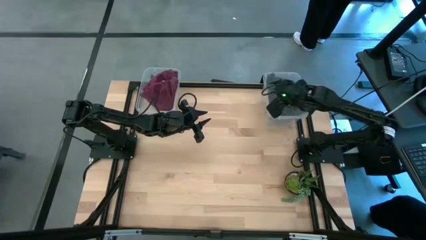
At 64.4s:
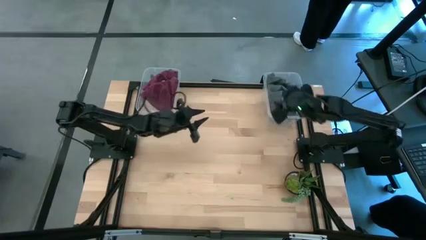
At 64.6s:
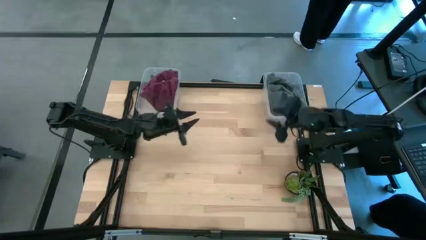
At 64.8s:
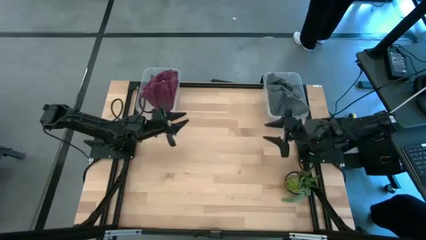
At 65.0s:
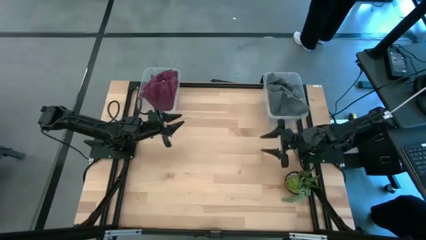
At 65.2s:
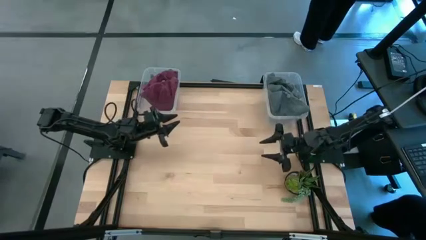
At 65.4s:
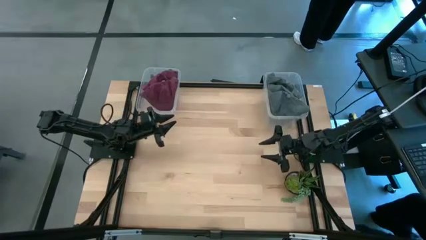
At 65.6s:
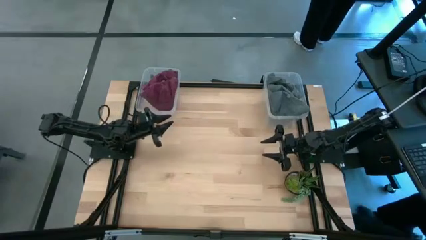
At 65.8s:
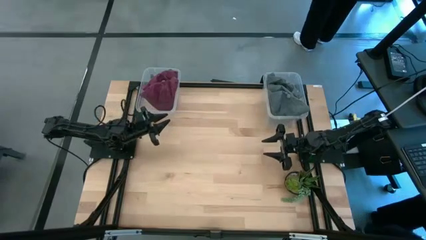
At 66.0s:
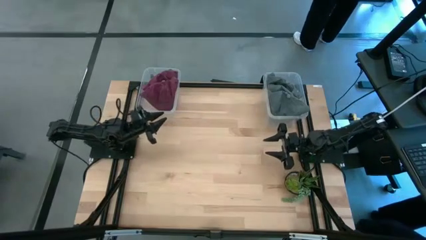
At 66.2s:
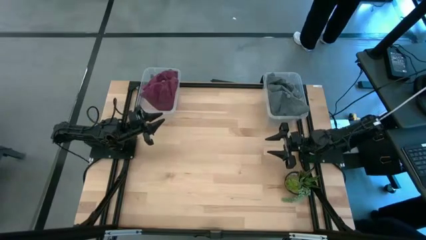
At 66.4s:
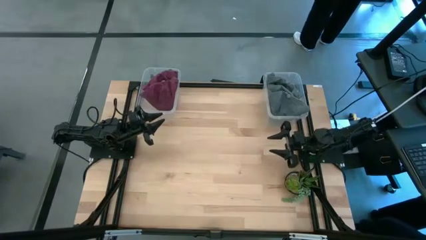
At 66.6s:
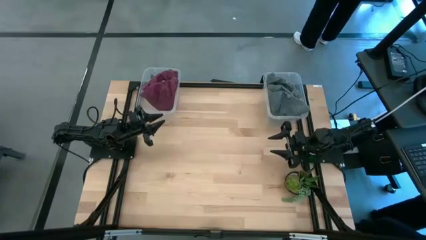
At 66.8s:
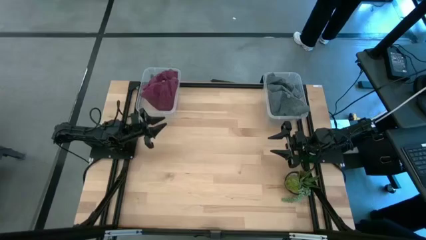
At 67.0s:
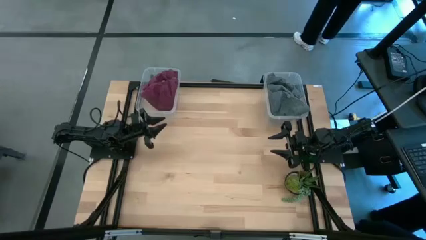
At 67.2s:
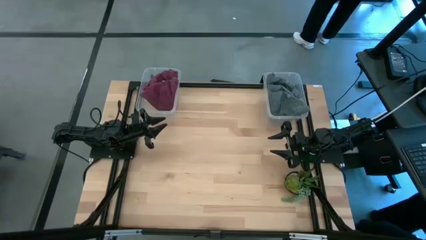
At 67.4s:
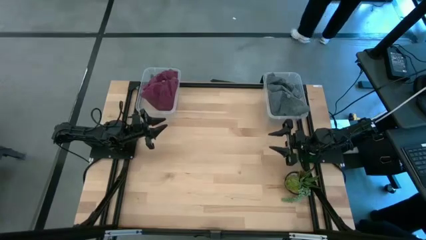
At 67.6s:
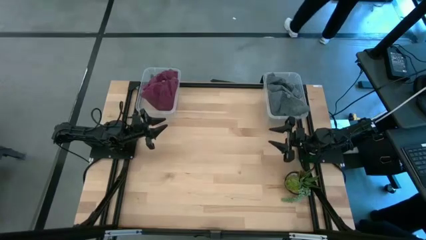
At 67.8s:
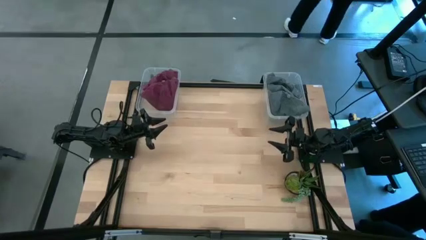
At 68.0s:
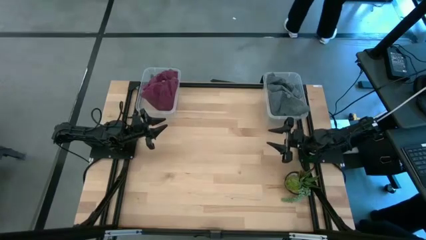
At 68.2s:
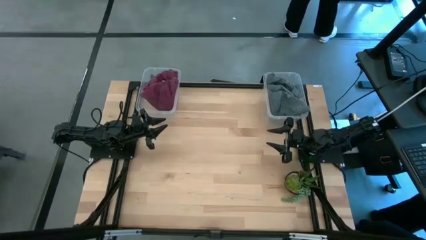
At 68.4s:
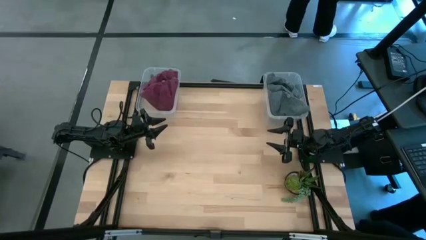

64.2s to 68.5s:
Task: Pick & Place hat
Return to Home Position

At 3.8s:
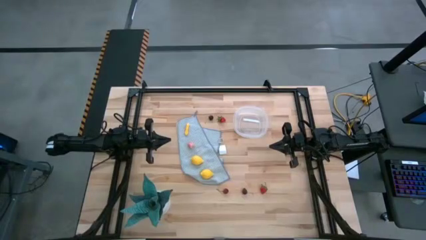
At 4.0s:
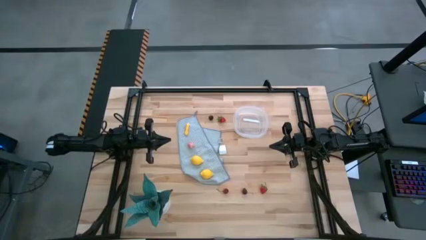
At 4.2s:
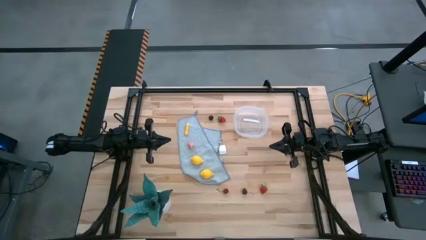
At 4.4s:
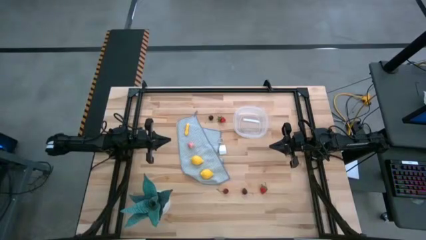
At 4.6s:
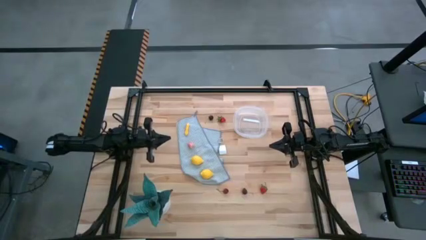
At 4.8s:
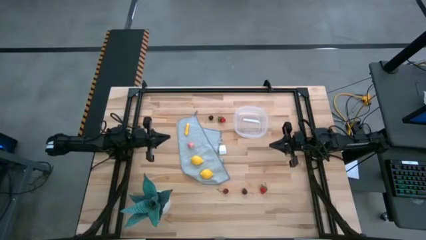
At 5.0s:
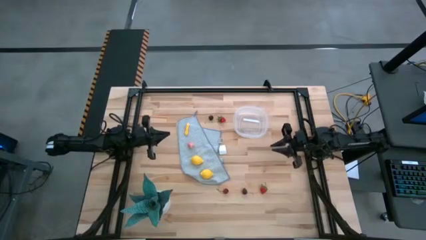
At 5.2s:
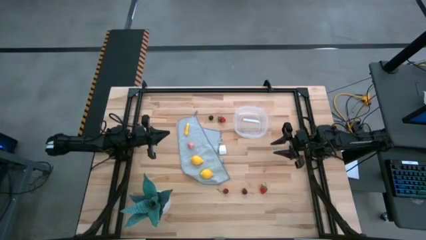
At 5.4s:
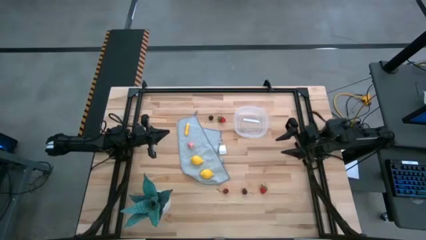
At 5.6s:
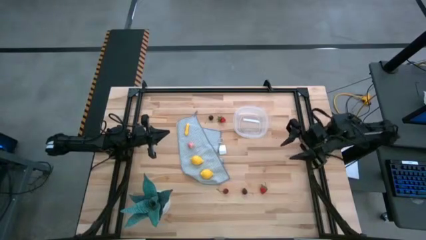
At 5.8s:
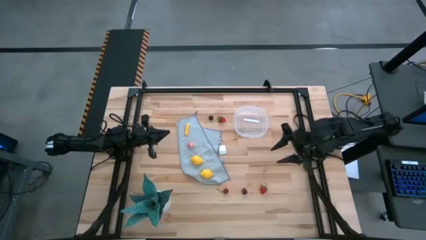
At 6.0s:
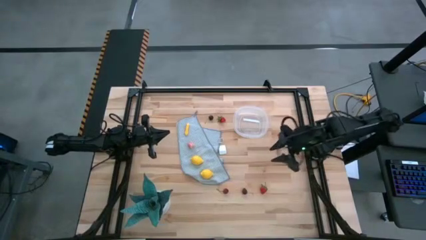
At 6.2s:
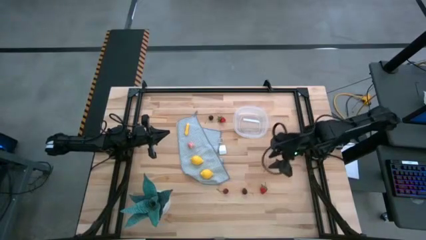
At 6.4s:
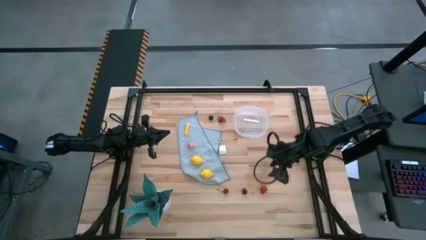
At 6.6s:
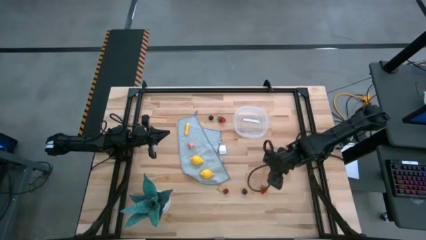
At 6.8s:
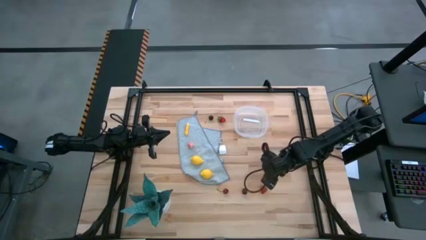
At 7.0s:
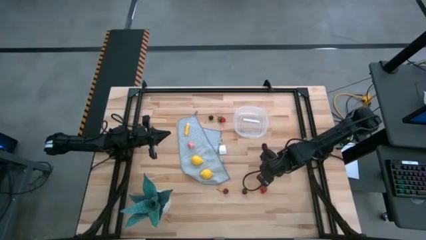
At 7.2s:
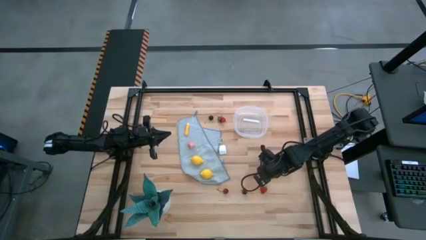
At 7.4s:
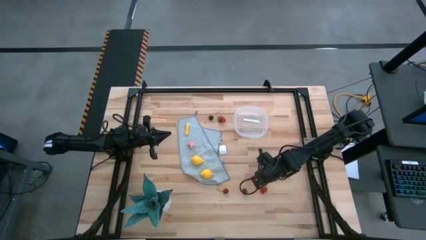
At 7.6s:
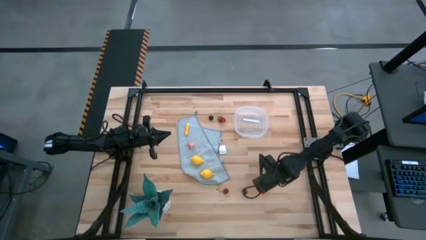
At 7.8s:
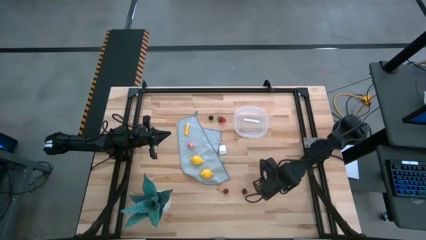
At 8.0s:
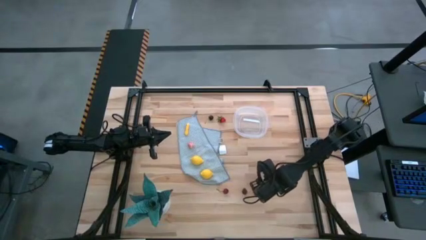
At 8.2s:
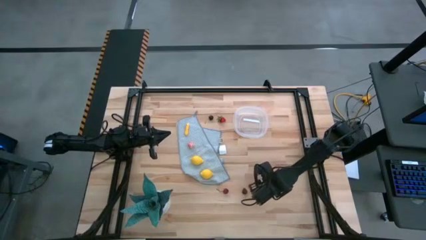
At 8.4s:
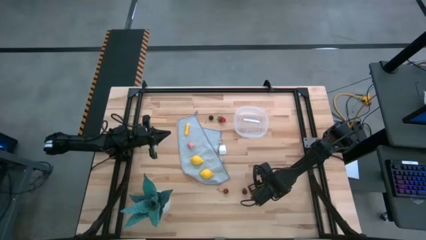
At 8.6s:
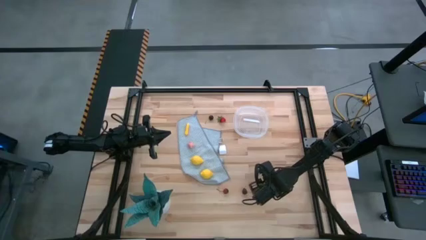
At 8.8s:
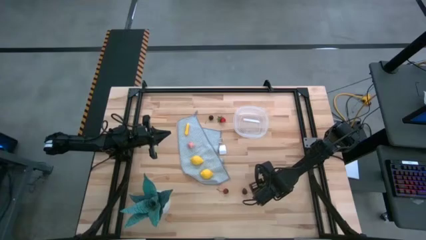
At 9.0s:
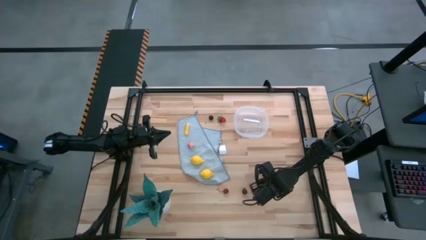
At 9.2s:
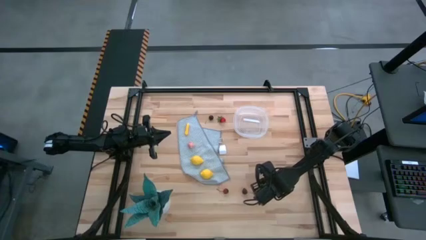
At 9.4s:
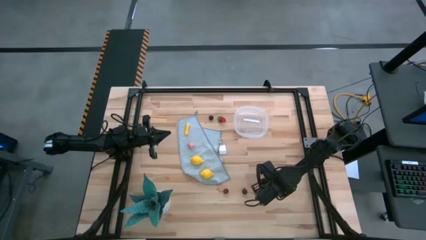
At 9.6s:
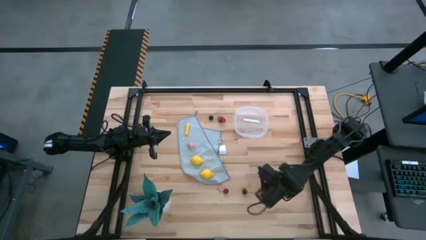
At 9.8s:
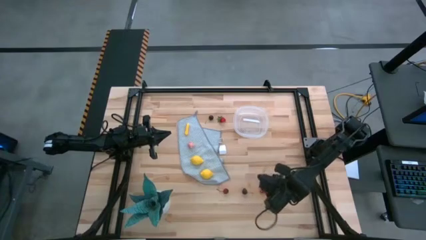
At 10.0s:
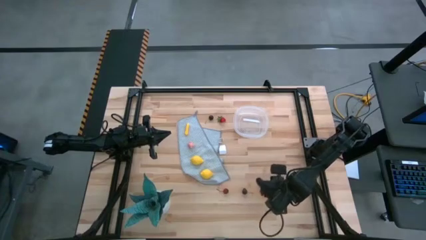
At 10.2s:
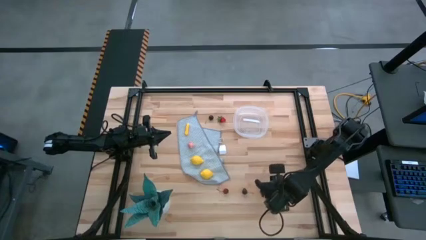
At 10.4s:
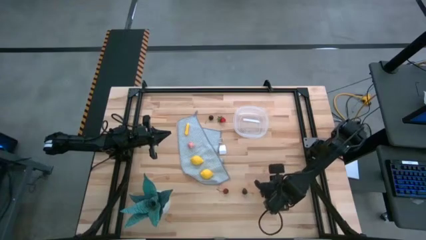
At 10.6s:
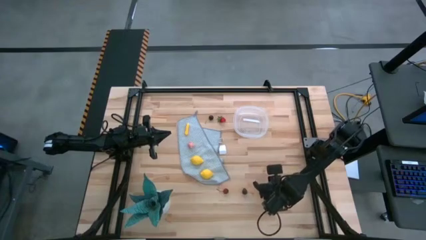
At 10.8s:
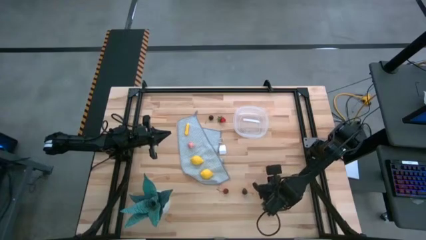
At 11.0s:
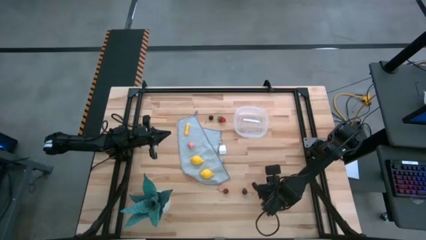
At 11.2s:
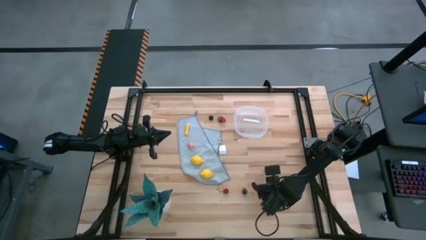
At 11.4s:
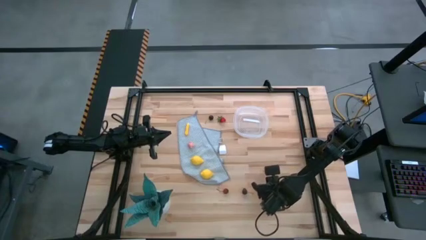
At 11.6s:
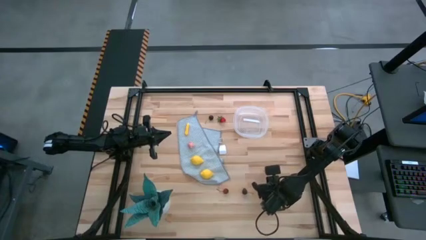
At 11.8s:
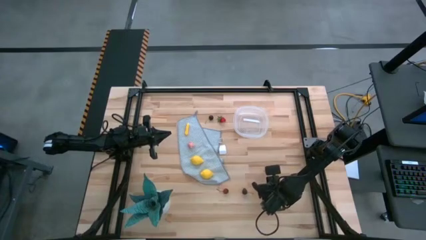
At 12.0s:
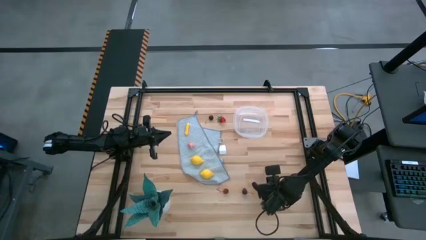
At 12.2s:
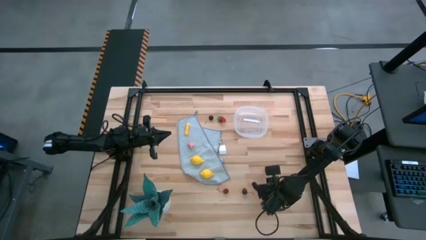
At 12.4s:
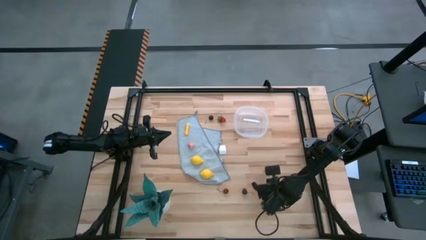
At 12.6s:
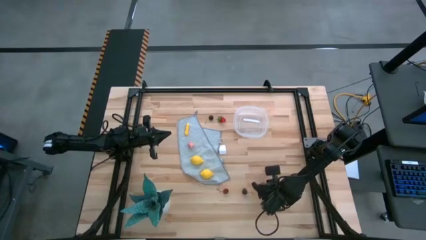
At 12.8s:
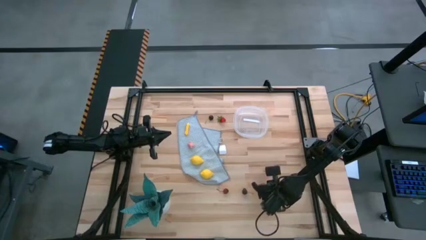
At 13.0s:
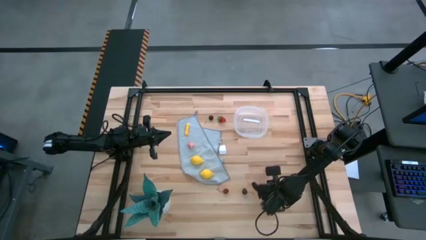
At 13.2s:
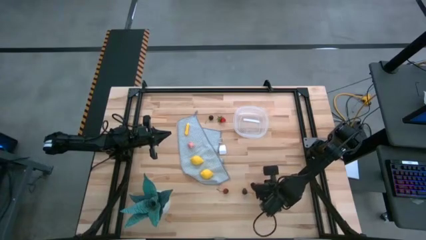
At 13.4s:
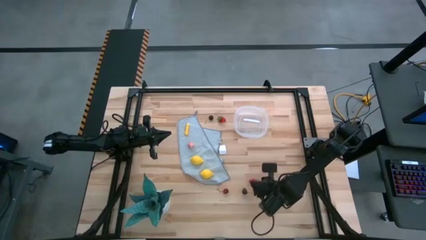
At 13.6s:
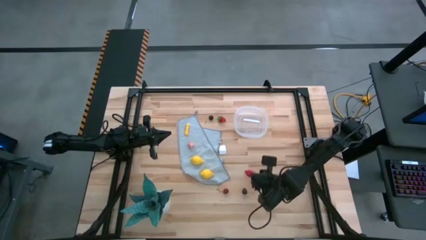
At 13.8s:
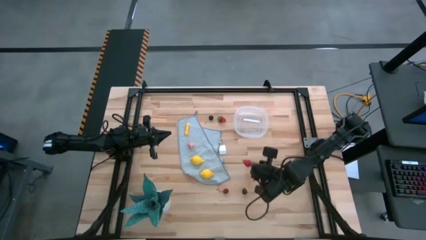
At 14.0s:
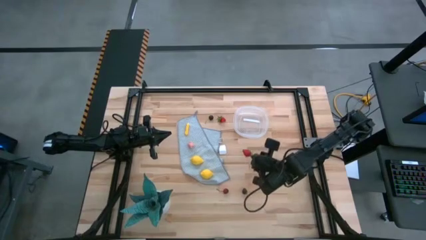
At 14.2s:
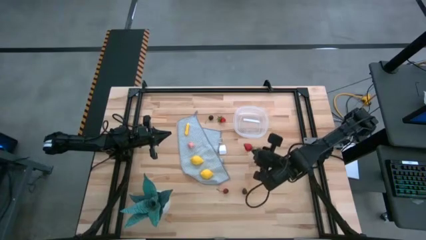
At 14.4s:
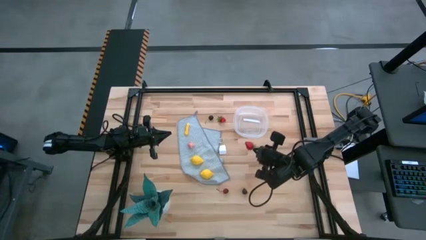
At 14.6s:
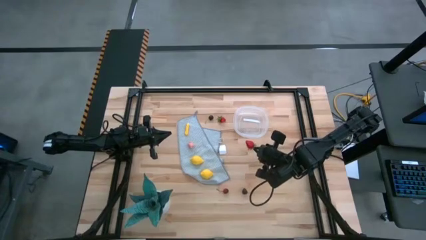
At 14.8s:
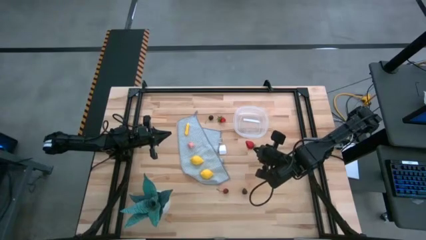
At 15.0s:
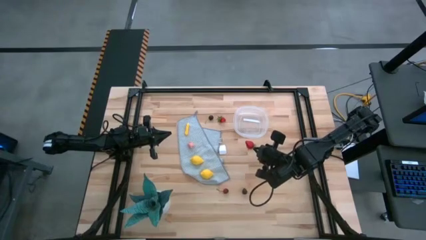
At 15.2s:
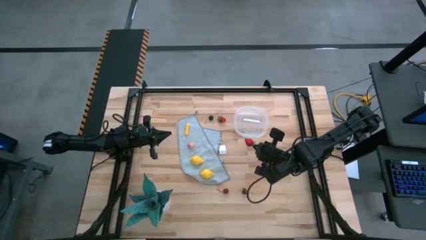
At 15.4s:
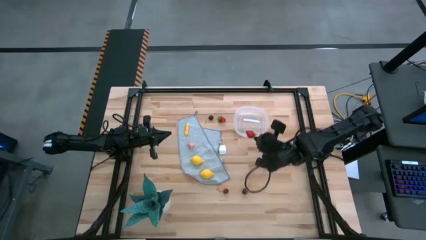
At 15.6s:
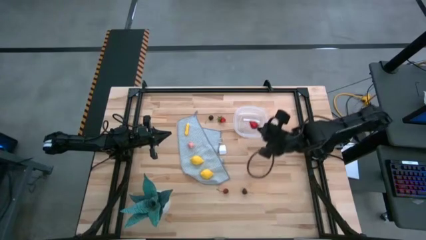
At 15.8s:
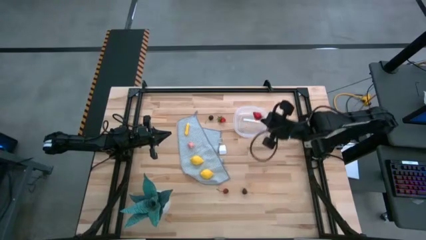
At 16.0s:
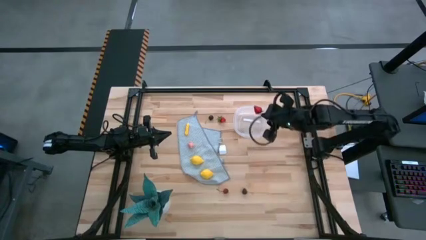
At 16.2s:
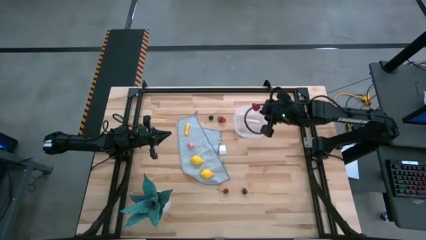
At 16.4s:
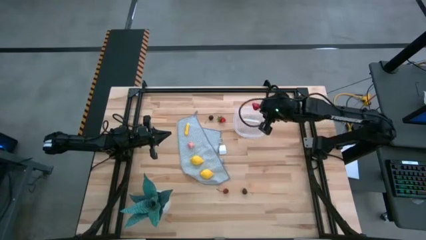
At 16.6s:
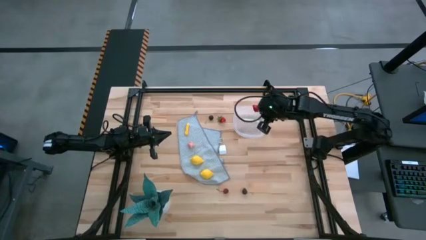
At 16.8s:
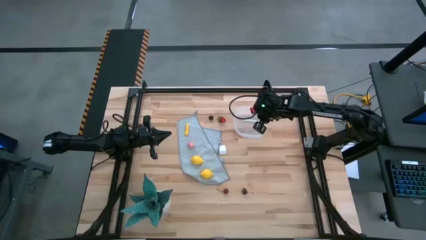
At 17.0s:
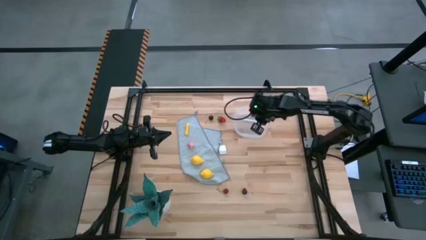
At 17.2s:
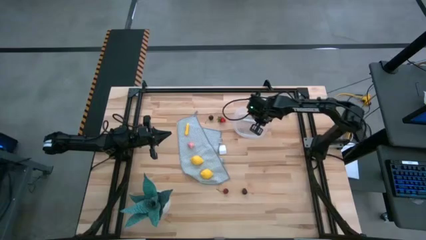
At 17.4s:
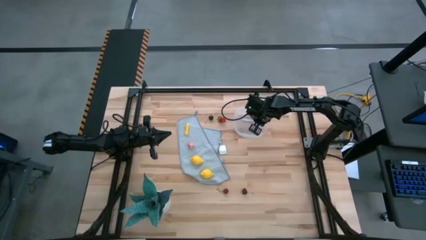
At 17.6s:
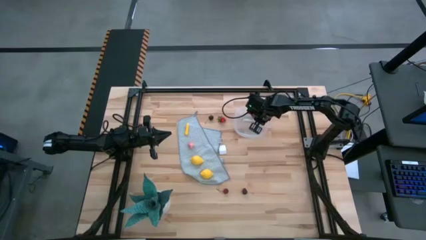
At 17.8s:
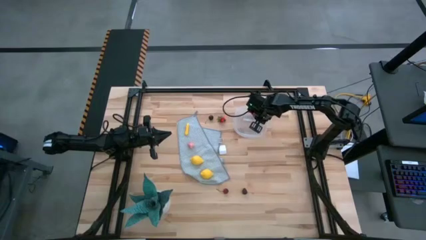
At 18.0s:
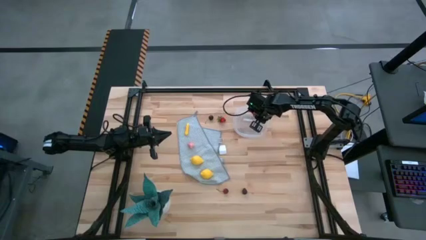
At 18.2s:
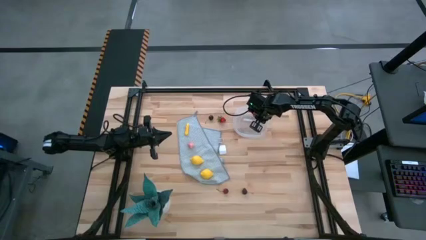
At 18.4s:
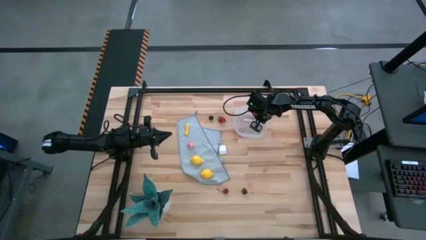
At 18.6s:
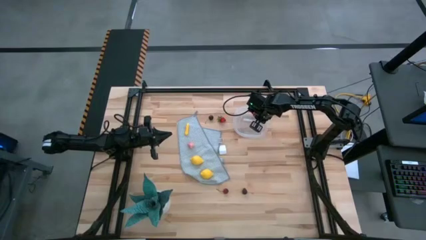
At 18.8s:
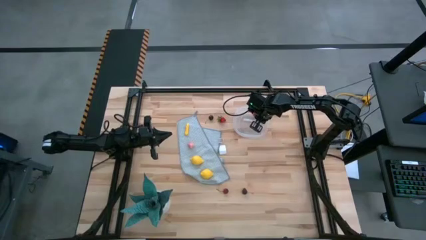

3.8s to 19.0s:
Task: Pick and placing Produce into tupperware
Put the bottom red strawberry into the transparent bin
